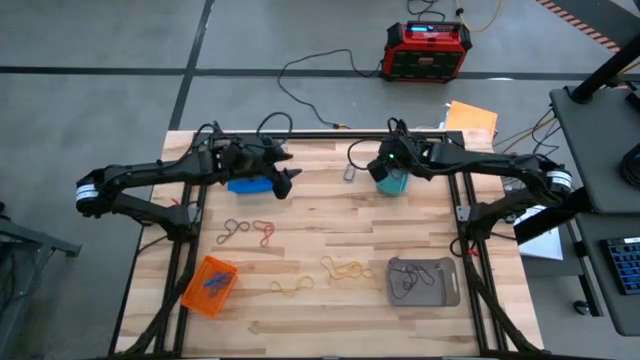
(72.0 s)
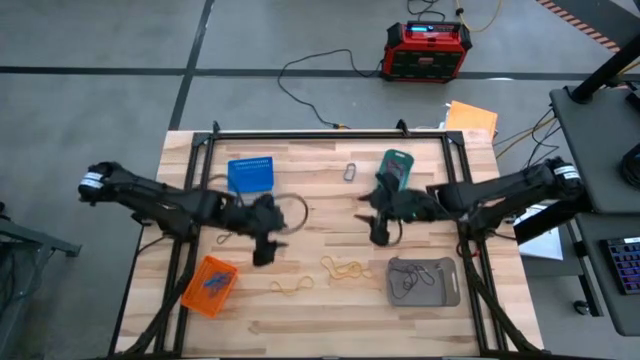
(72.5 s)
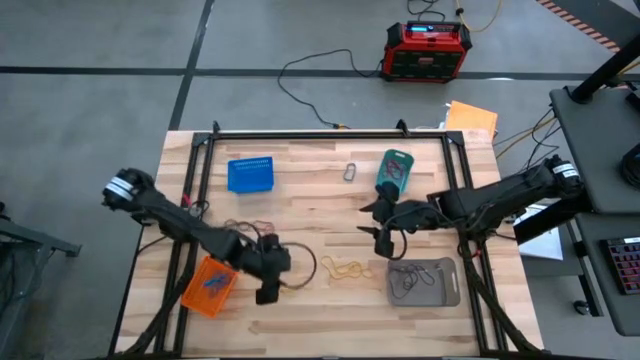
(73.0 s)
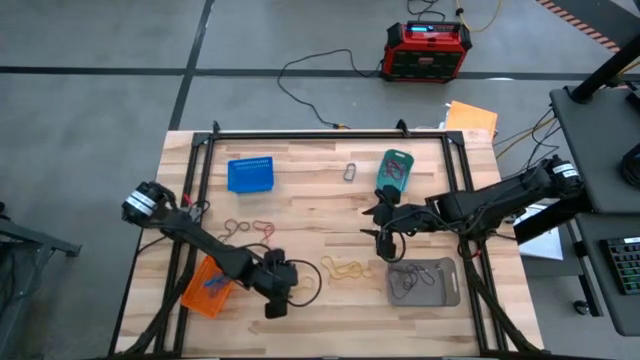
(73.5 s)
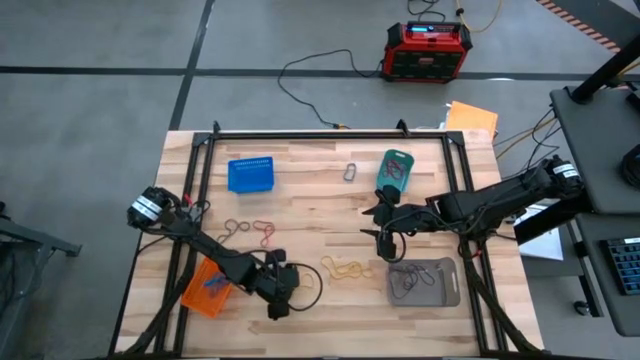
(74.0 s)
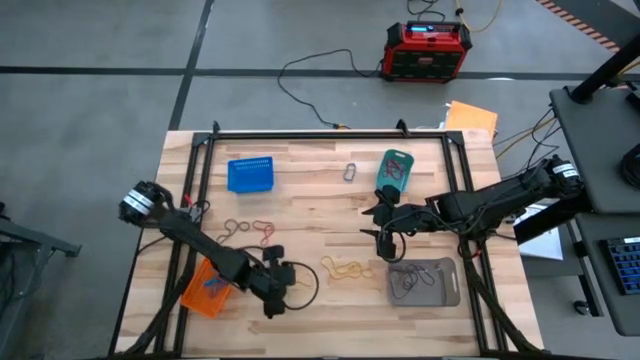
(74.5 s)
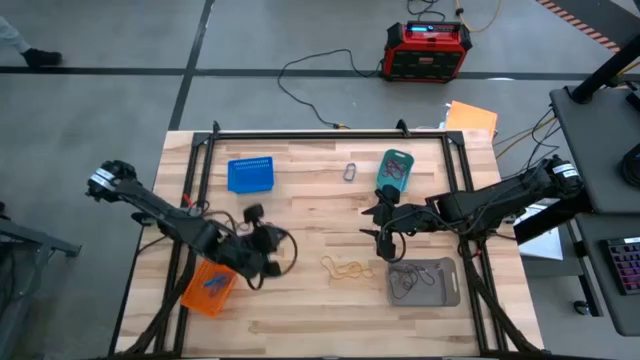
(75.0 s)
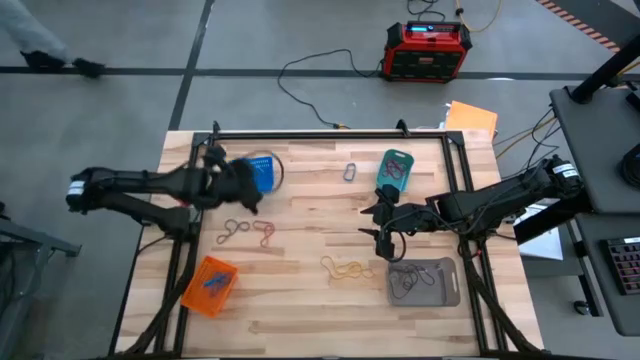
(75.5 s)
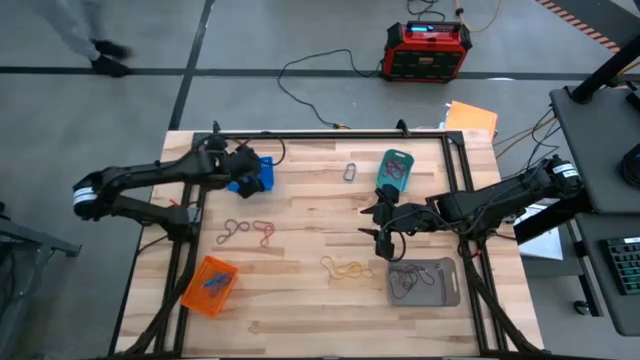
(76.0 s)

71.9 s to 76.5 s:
Task: Sort rubber bands into baskets
Put the bottom left yellow rubber band into the left blue bin

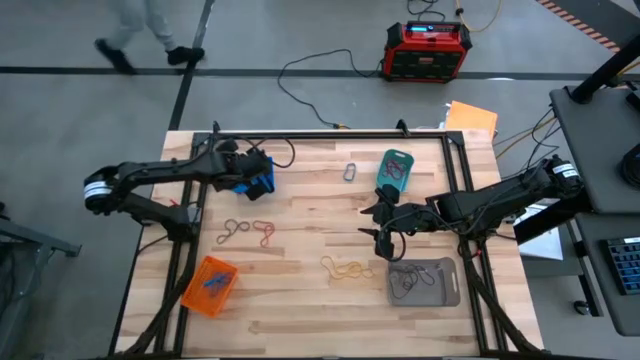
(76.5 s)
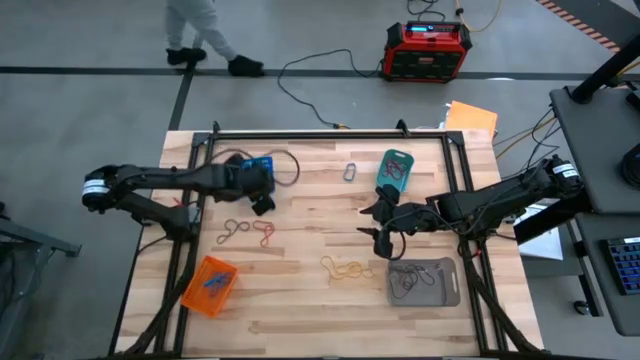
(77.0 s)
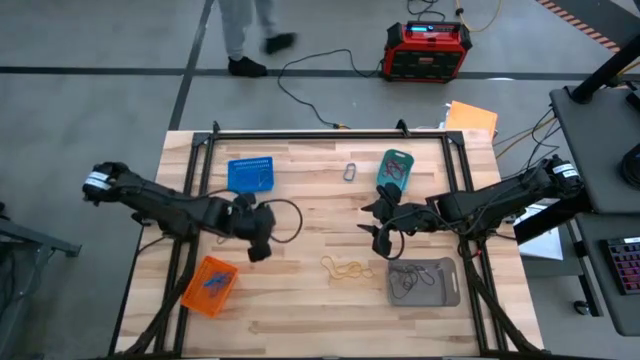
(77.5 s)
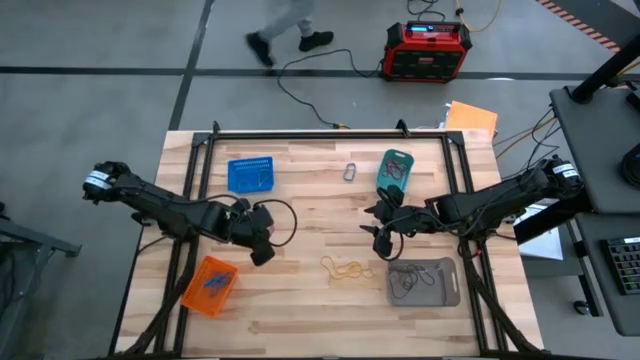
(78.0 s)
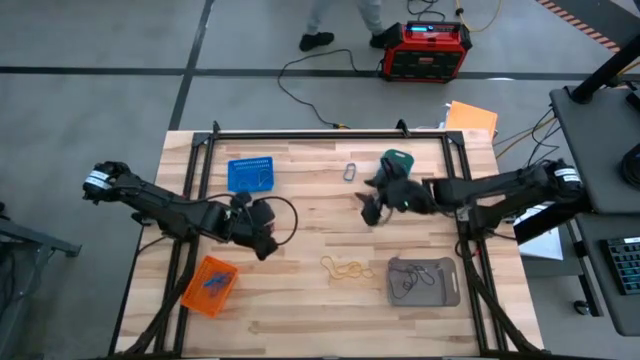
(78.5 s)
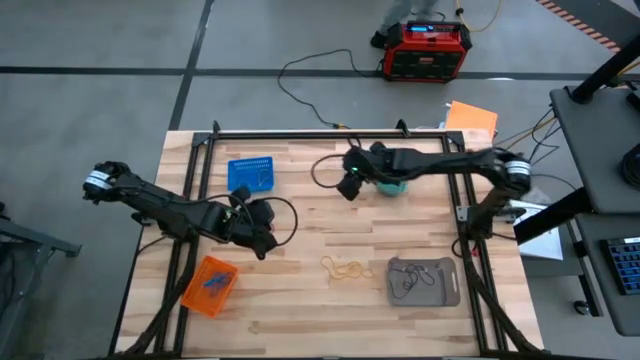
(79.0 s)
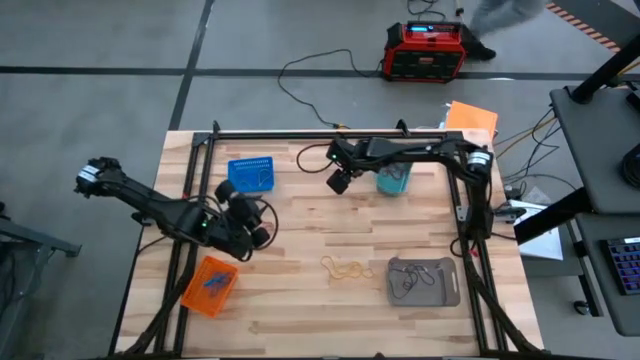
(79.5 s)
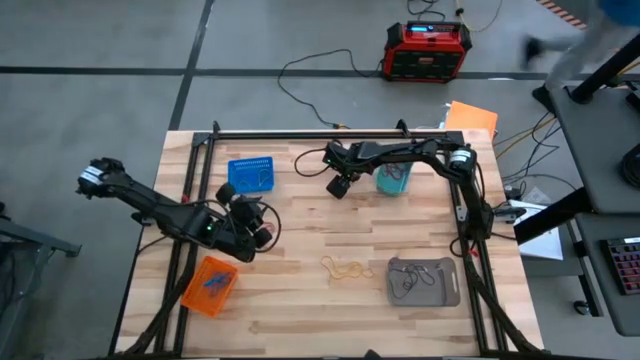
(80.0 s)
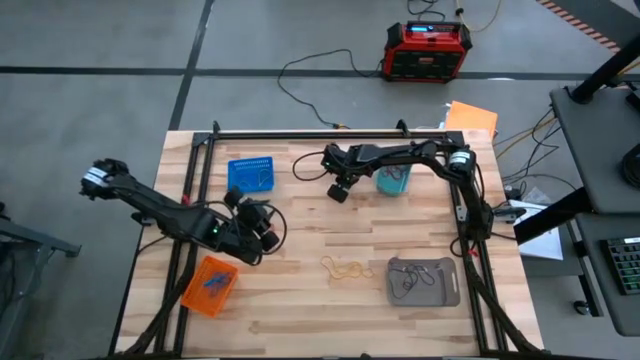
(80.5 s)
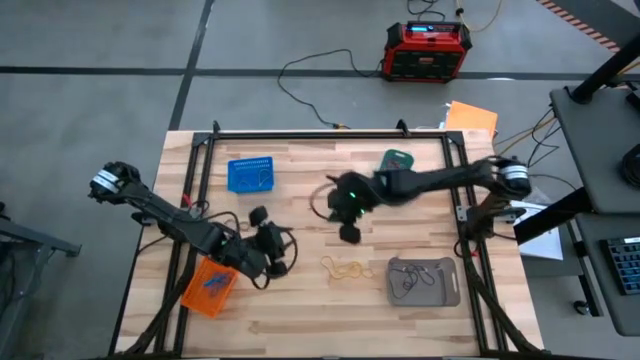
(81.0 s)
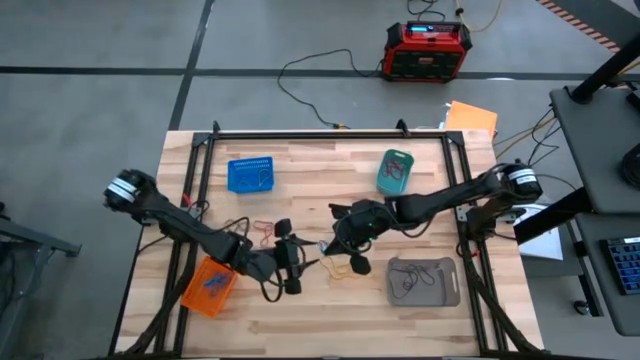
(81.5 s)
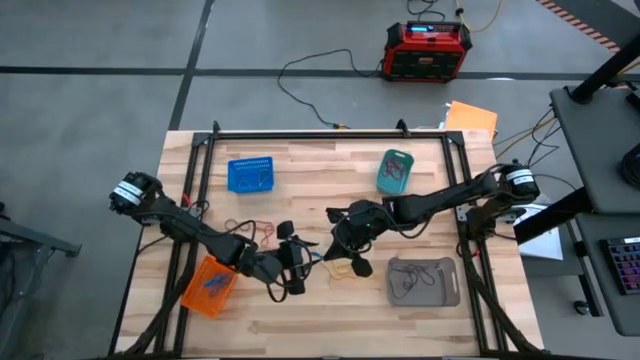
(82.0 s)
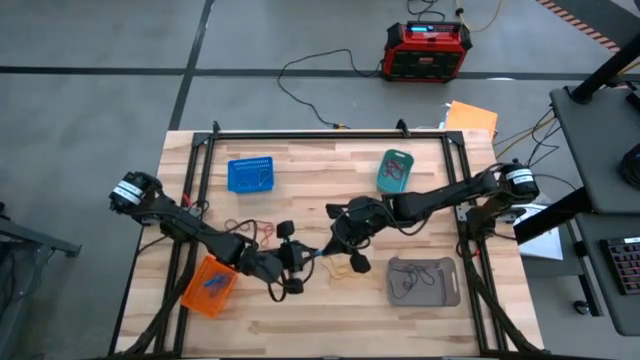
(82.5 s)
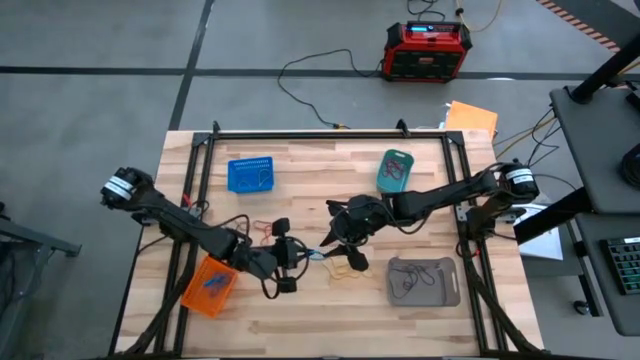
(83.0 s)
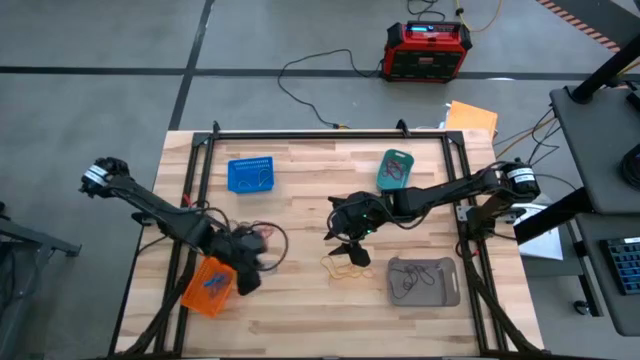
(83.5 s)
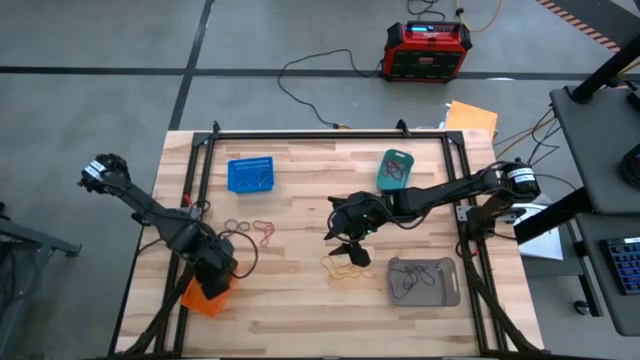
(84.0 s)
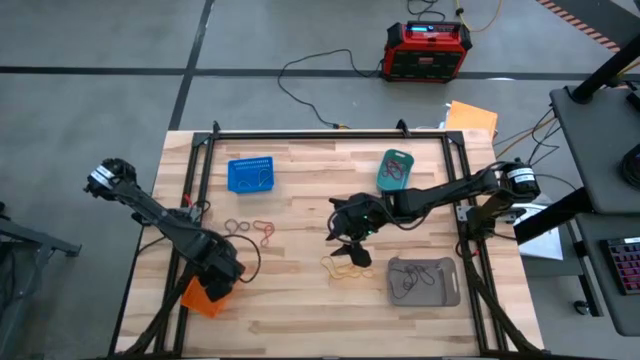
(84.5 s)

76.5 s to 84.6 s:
Put the blue rubber band into the orange bin

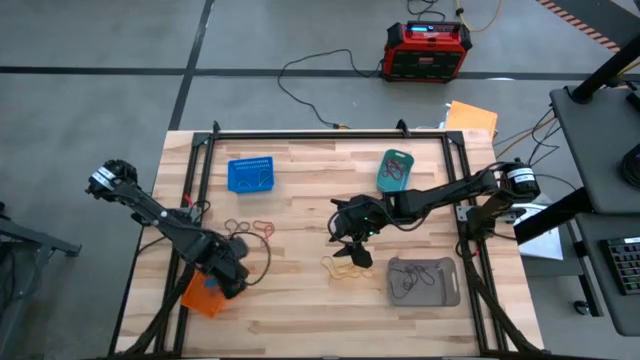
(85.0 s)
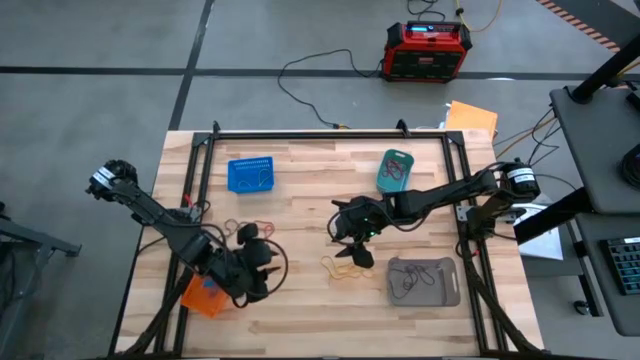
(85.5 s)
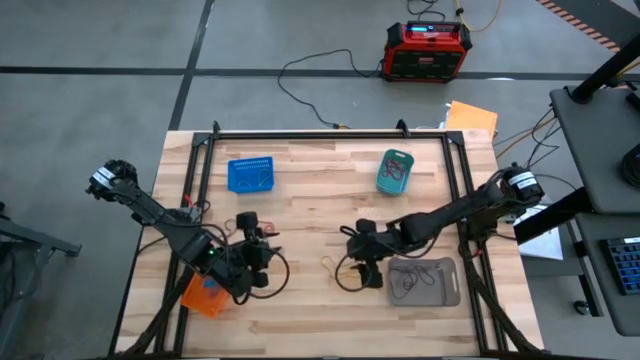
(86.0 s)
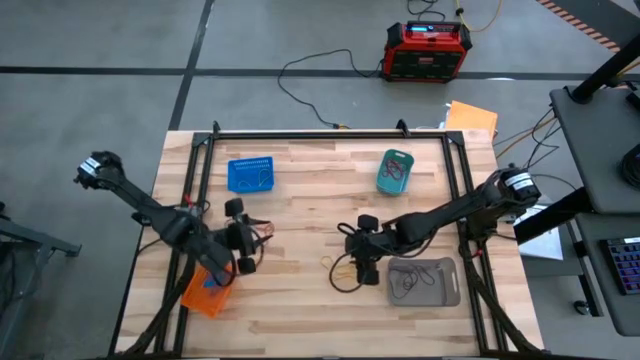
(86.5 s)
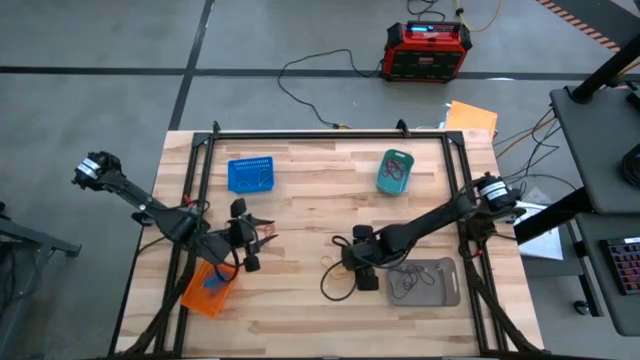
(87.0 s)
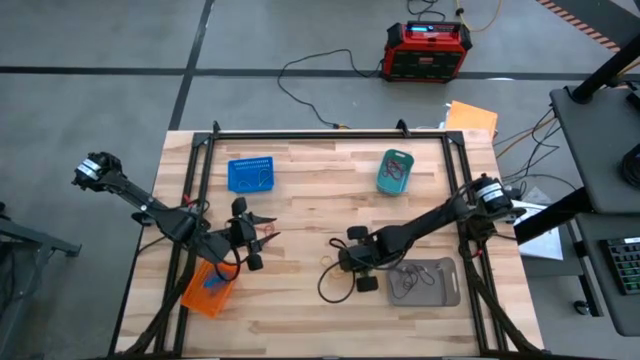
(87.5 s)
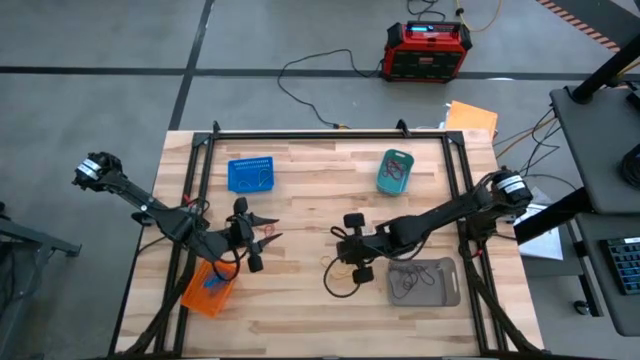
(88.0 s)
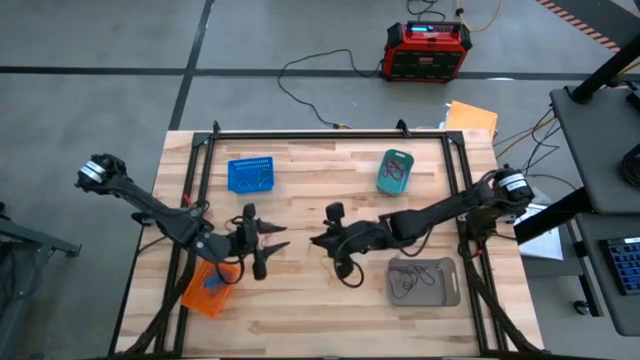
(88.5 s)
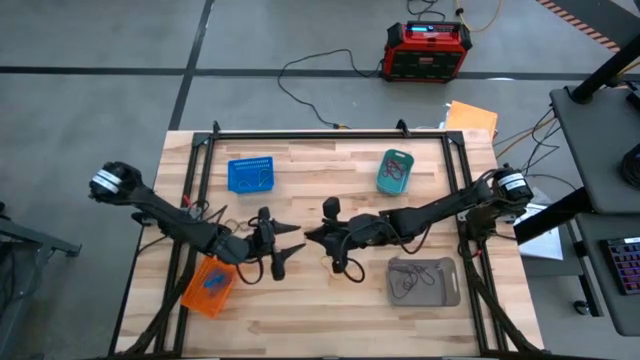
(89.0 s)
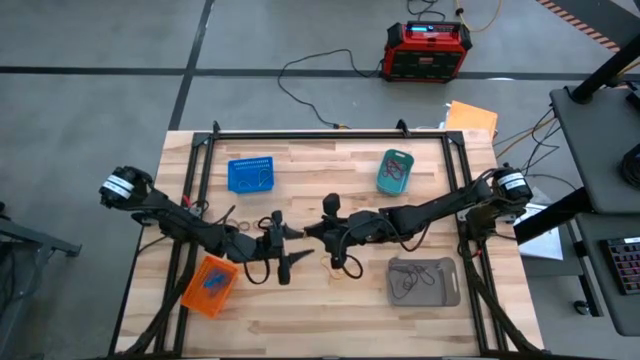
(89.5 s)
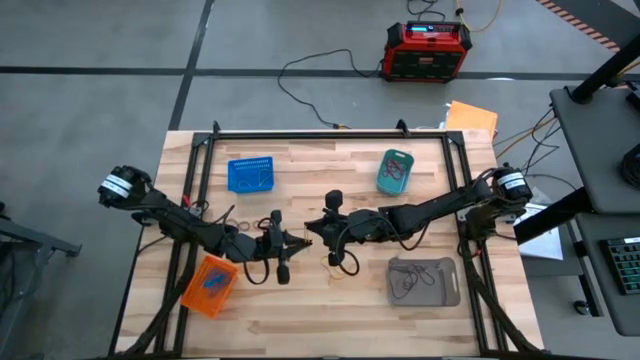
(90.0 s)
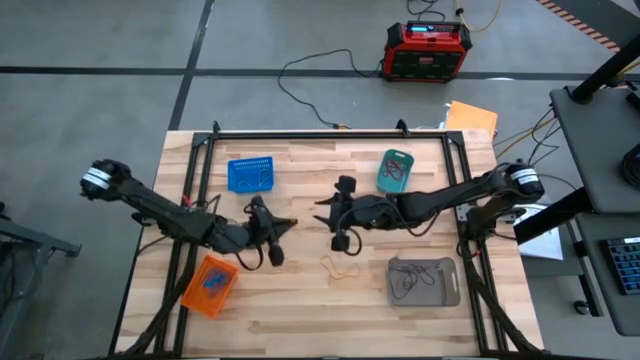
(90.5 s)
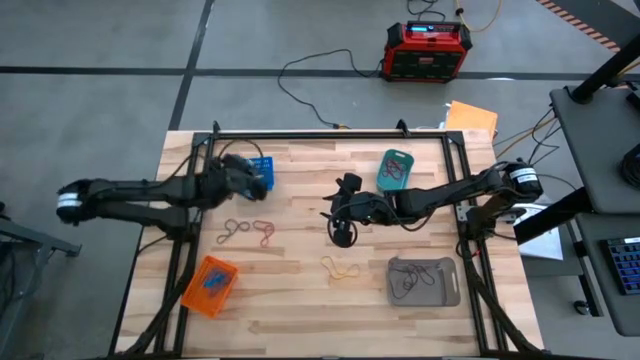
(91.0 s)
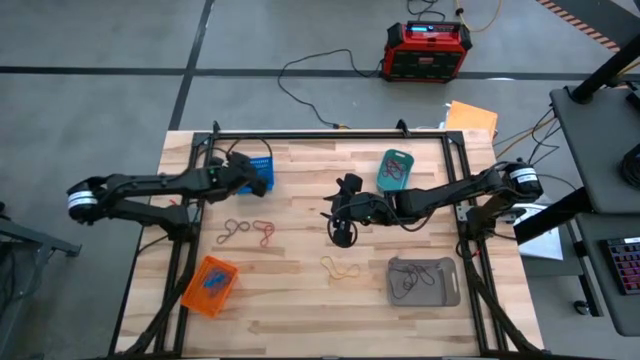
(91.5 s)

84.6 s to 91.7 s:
Put the right yellow rubber band into the left blue bin

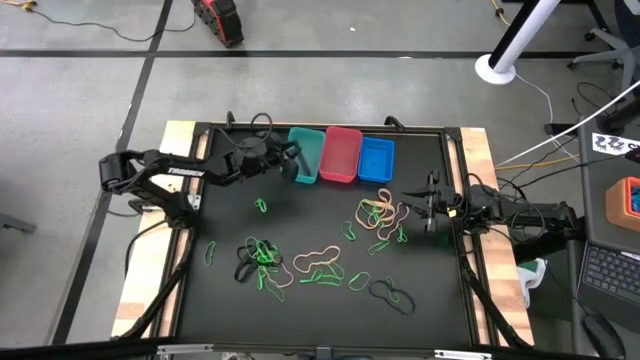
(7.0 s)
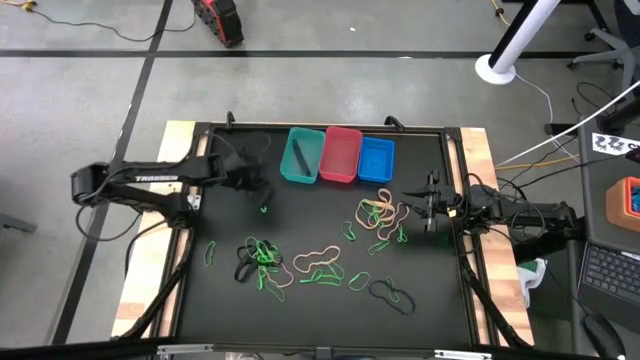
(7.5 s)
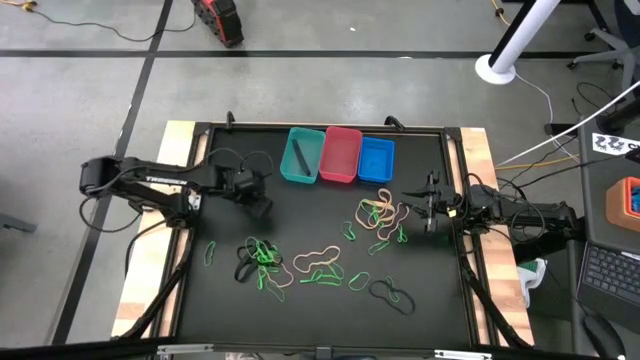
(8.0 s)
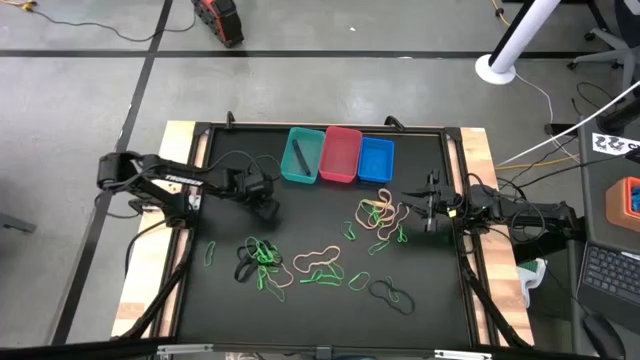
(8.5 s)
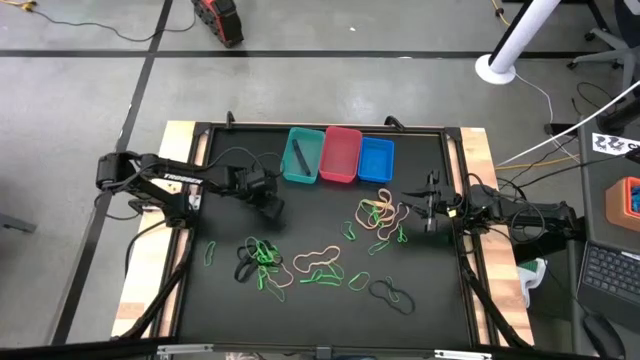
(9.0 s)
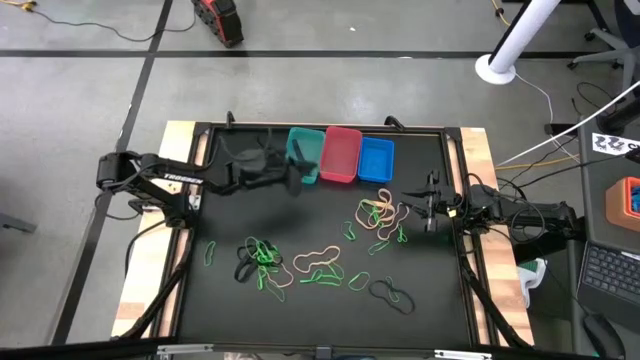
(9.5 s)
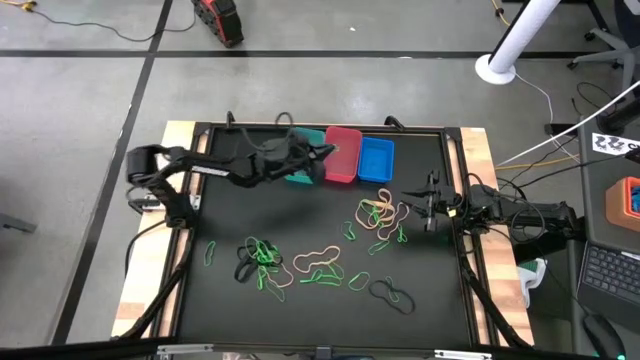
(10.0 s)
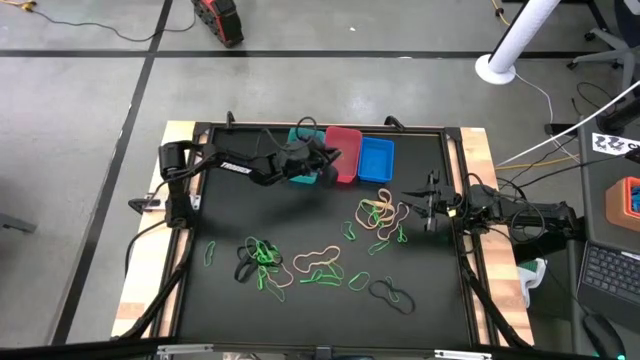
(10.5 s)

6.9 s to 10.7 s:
Task: Sort rubber bands into baskets
Put the green rubber band into the pink bin
